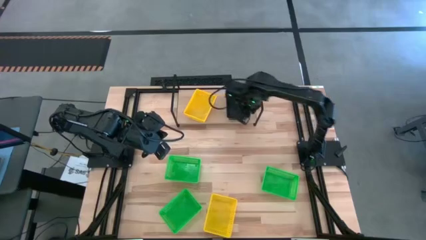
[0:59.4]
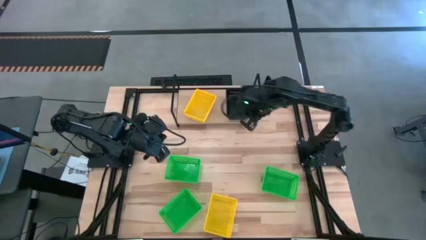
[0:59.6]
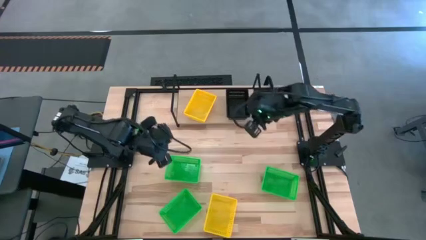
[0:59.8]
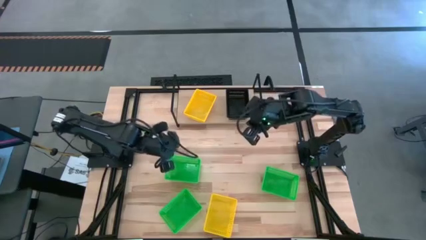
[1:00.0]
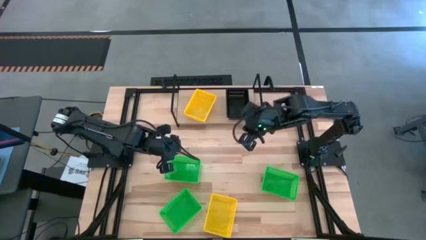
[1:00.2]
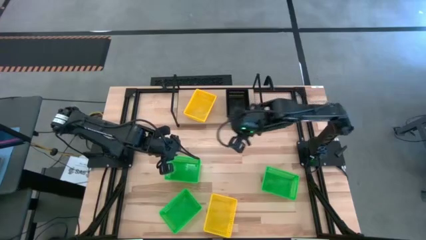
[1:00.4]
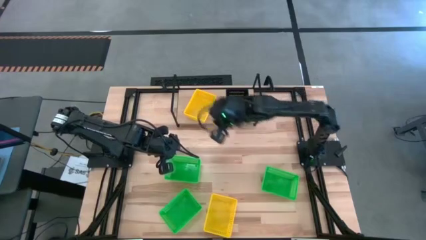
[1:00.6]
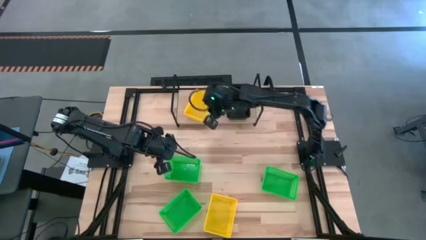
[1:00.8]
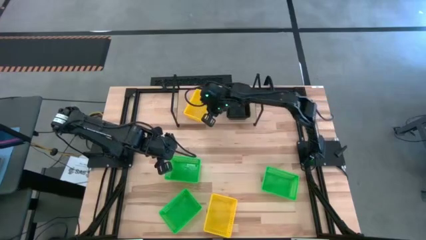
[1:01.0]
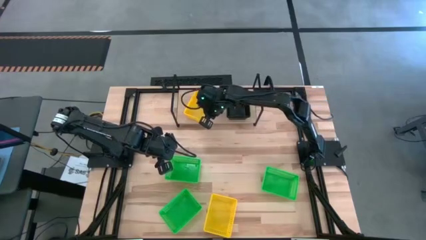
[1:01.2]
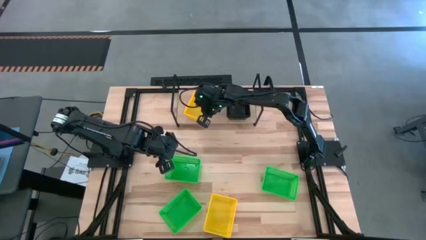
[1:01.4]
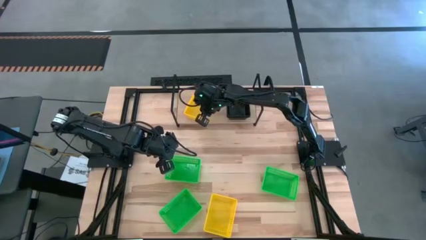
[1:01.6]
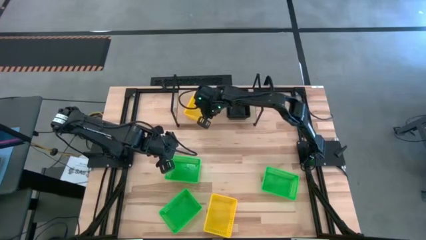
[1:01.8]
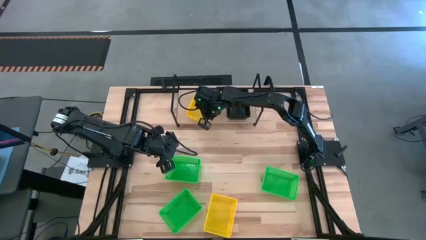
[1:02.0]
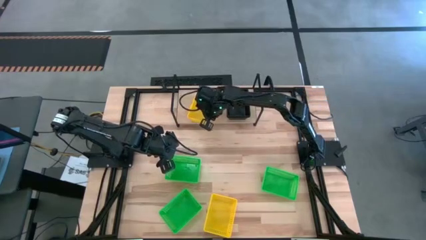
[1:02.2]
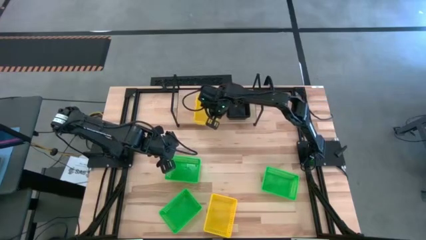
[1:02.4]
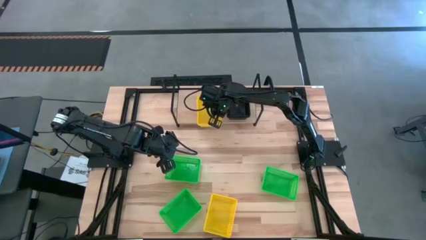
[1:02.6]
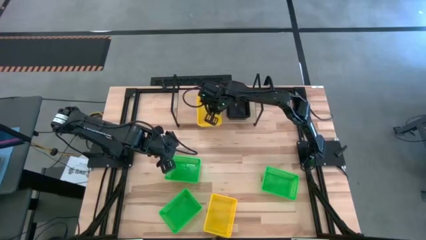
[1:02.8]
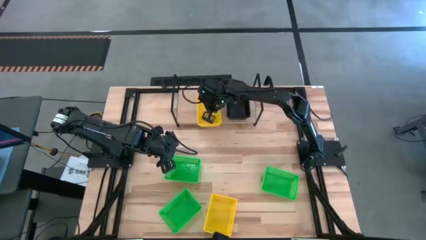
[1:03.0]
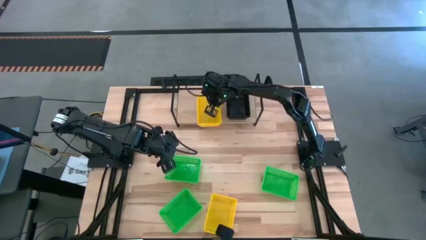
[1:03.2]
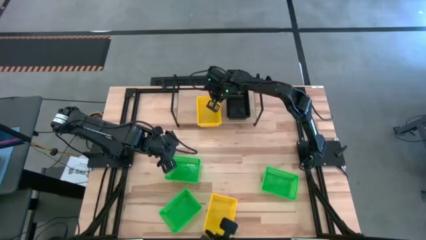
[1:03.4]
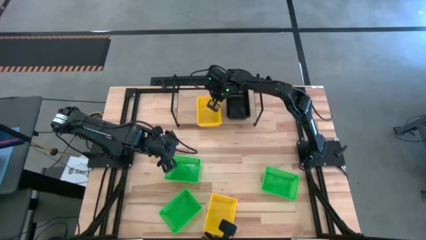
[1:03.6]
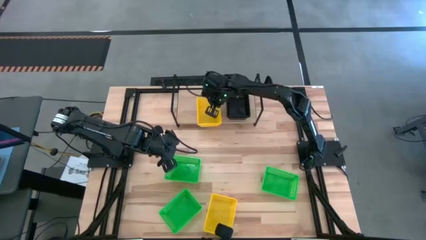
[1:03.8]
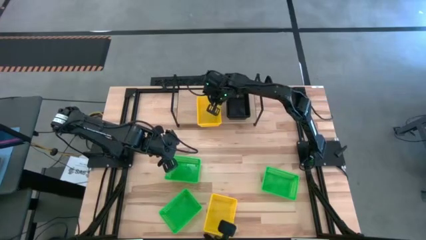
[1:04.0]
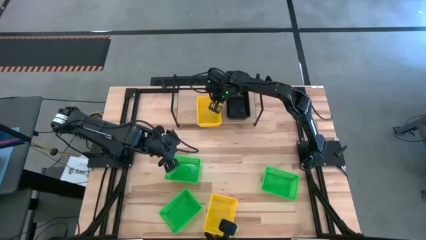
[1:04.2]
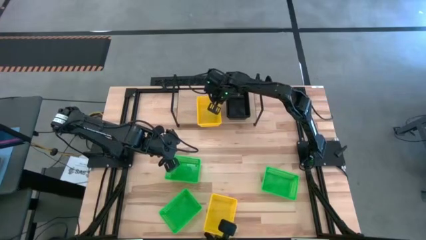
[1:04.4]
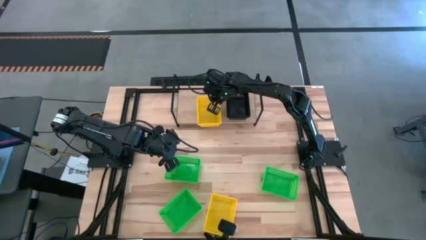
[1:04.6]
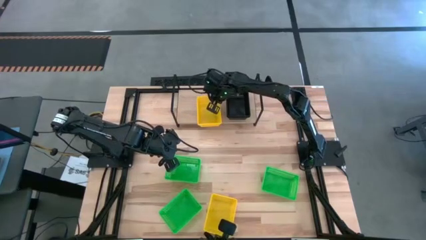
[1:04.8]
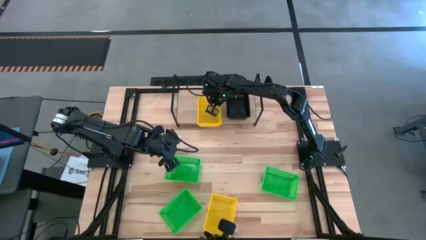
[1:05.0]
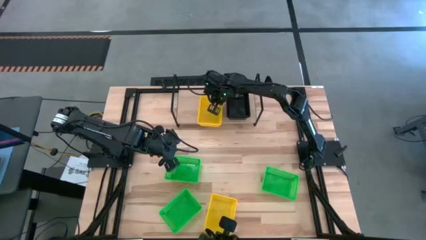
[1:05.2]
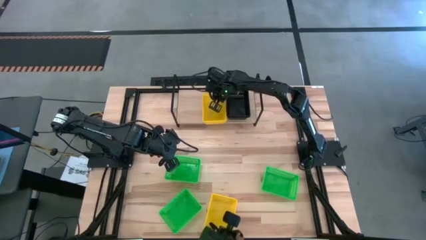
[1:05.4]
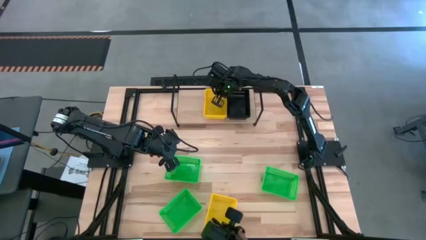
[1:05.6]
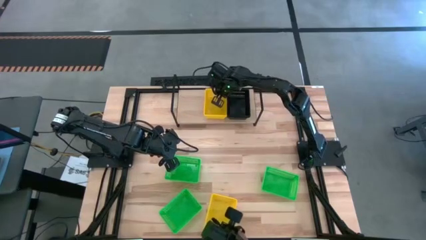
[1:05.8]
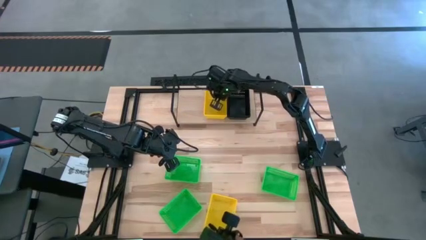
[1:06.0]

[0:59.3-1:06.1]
Task: Stack baskets on shelf by color
Adjust the yellow bins on the shelf

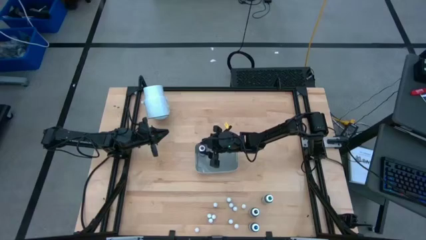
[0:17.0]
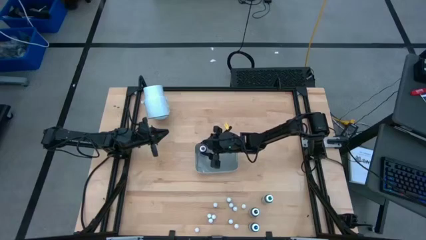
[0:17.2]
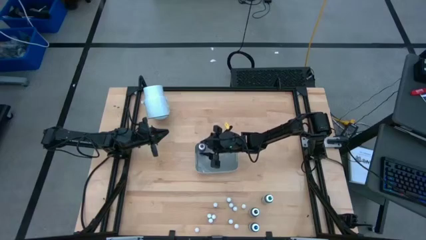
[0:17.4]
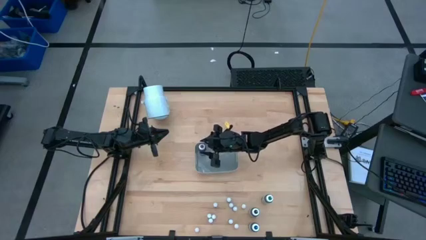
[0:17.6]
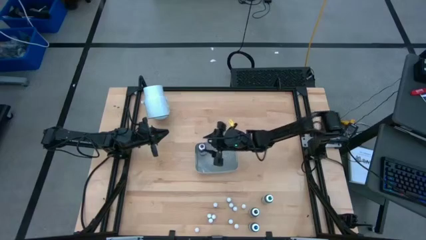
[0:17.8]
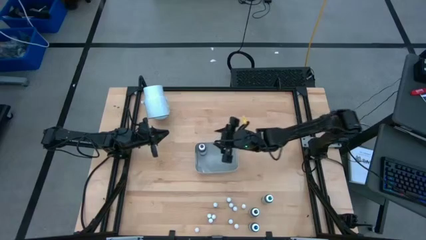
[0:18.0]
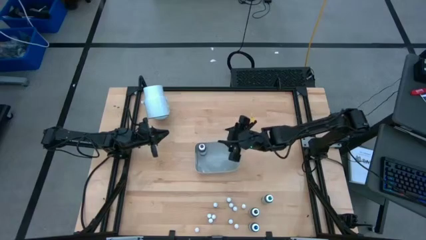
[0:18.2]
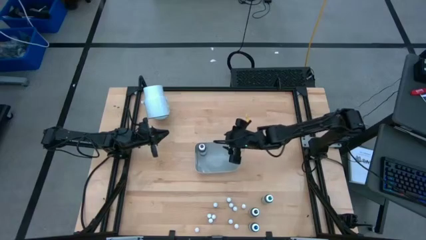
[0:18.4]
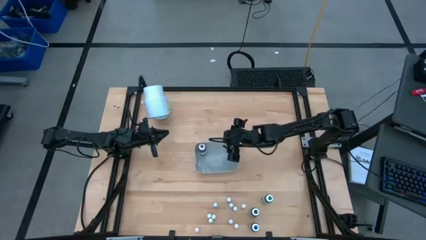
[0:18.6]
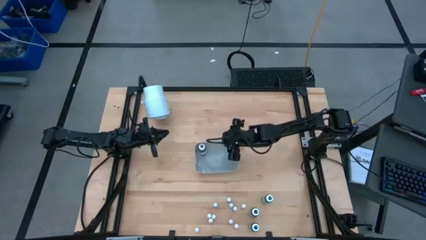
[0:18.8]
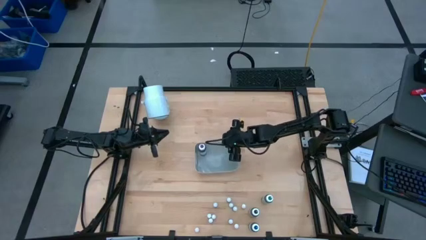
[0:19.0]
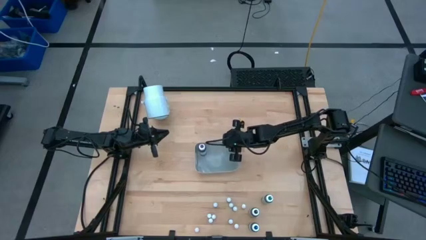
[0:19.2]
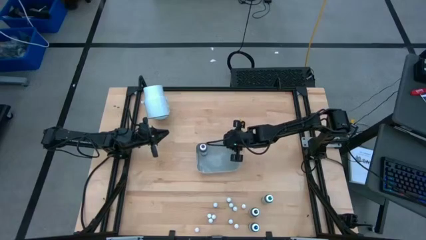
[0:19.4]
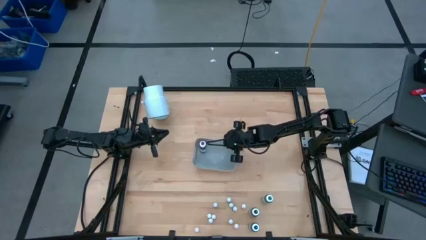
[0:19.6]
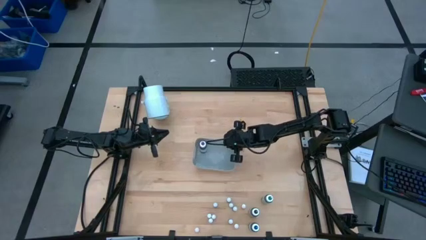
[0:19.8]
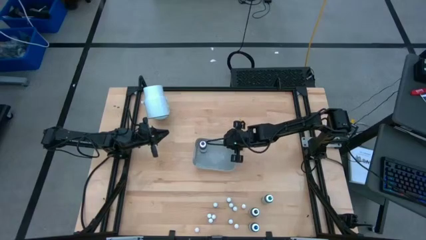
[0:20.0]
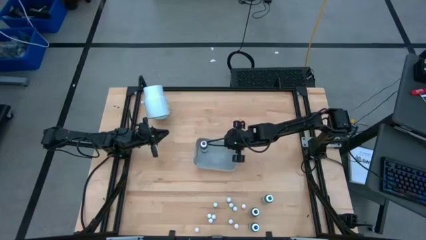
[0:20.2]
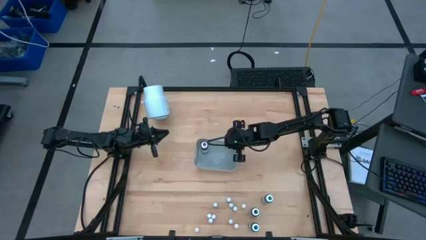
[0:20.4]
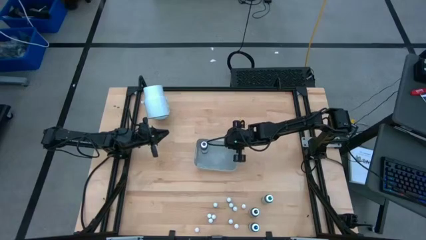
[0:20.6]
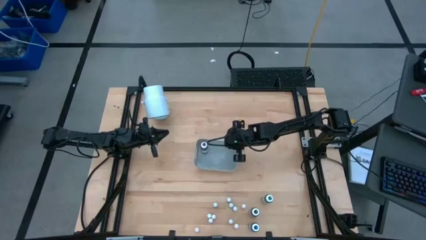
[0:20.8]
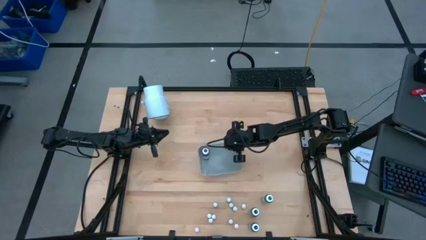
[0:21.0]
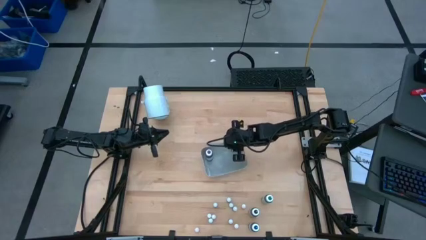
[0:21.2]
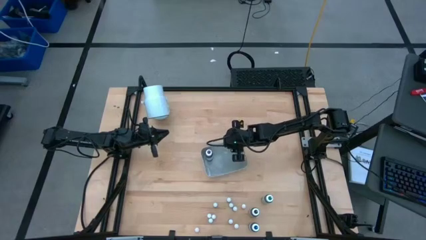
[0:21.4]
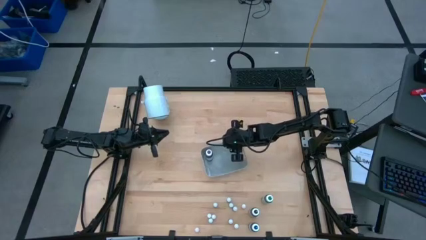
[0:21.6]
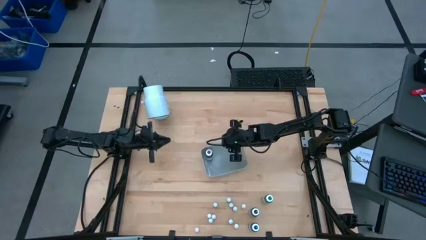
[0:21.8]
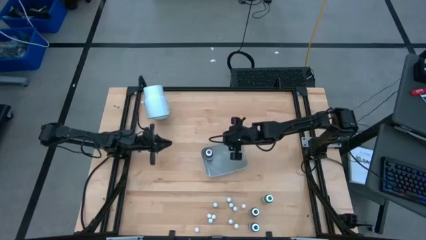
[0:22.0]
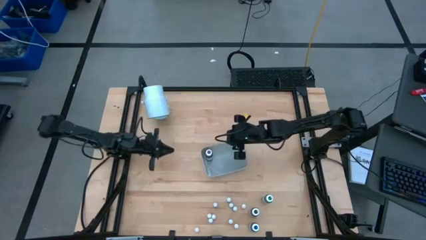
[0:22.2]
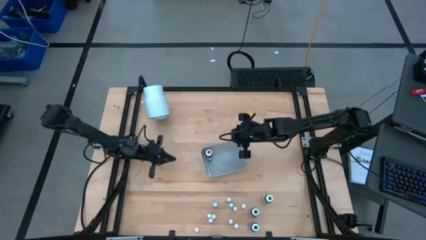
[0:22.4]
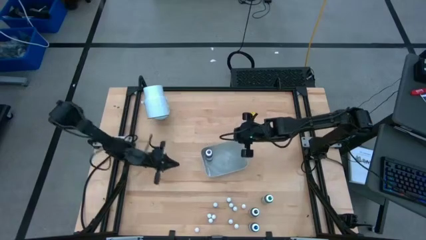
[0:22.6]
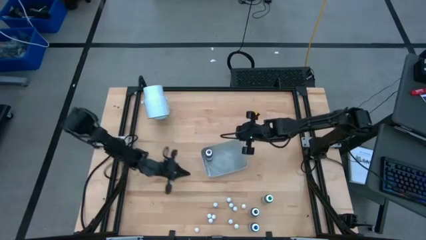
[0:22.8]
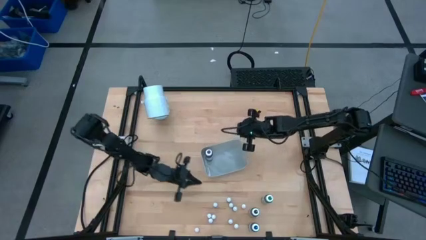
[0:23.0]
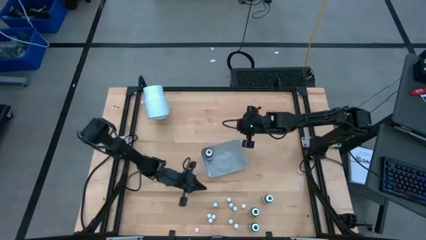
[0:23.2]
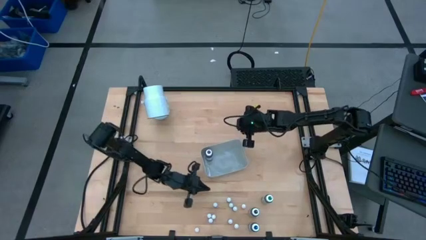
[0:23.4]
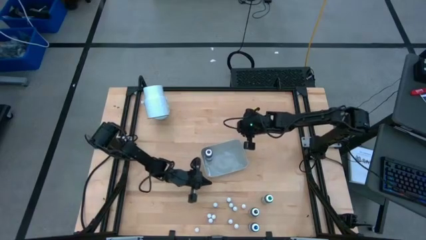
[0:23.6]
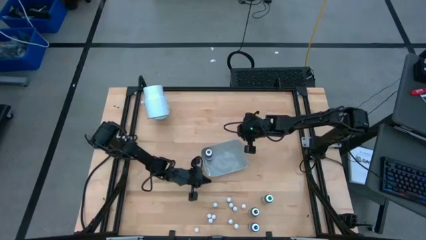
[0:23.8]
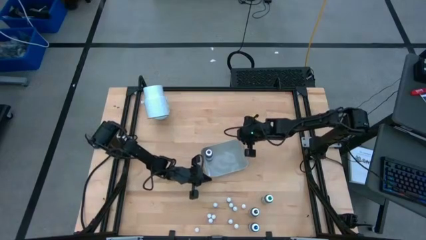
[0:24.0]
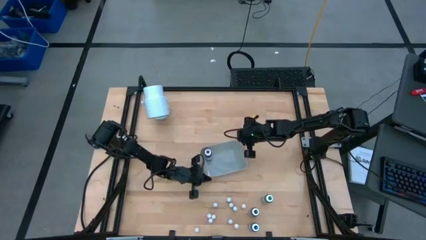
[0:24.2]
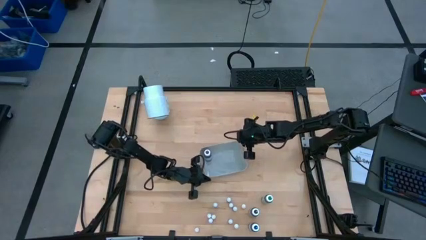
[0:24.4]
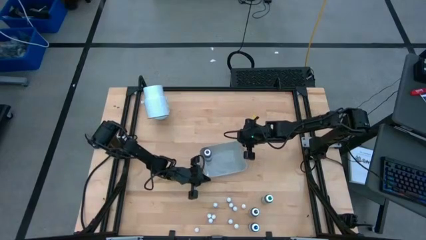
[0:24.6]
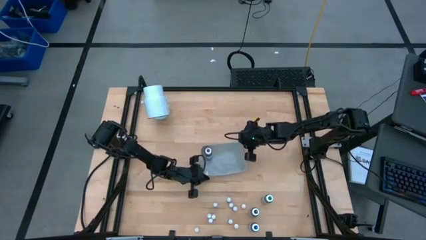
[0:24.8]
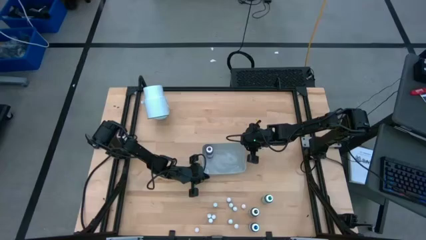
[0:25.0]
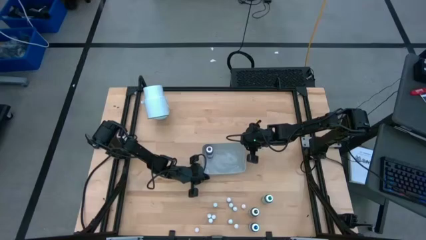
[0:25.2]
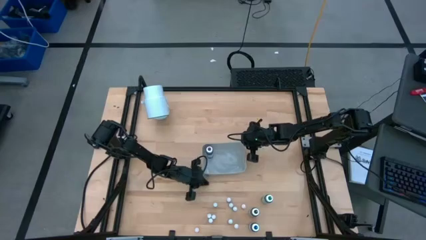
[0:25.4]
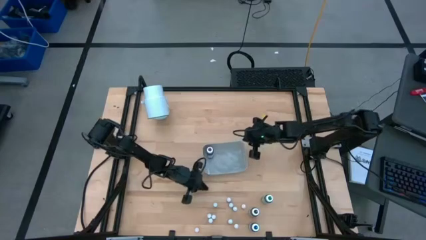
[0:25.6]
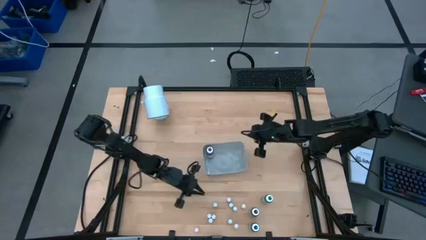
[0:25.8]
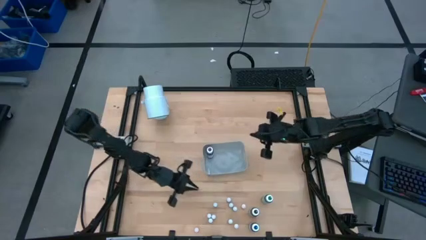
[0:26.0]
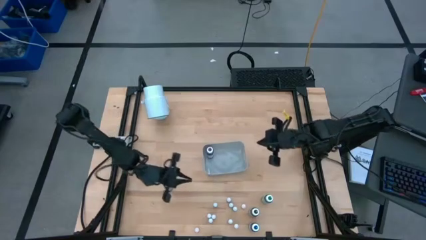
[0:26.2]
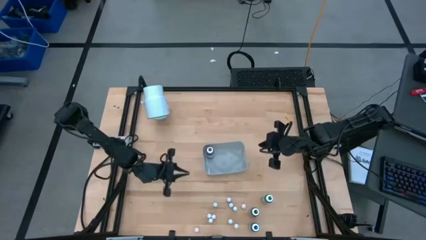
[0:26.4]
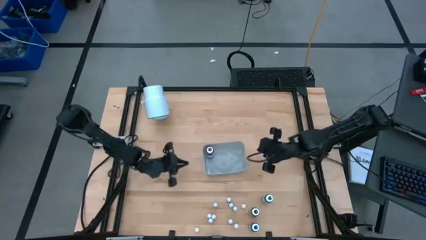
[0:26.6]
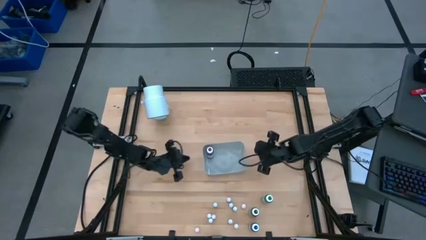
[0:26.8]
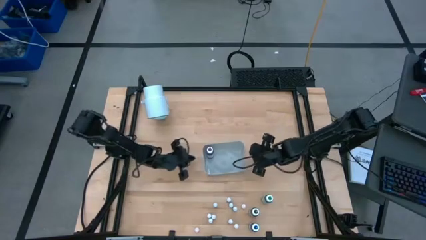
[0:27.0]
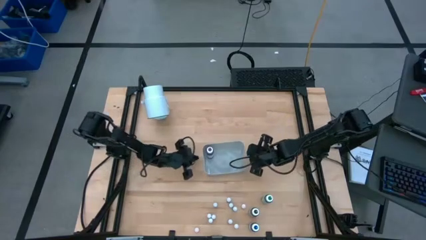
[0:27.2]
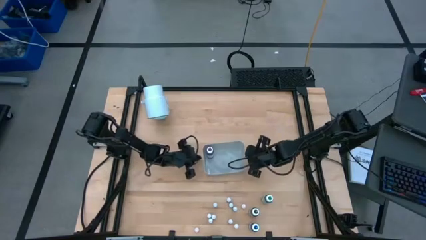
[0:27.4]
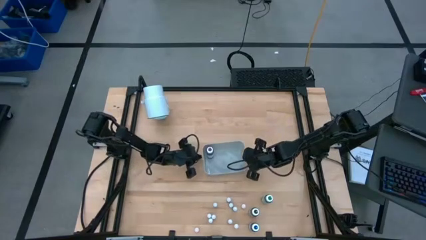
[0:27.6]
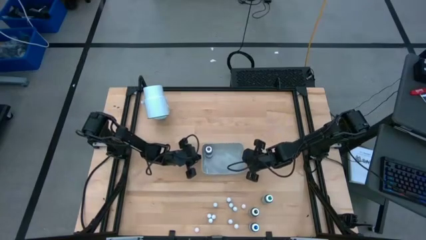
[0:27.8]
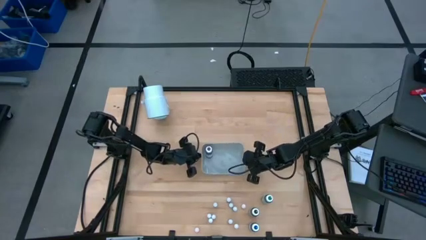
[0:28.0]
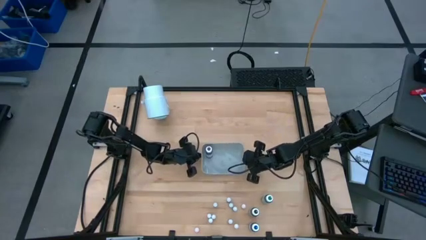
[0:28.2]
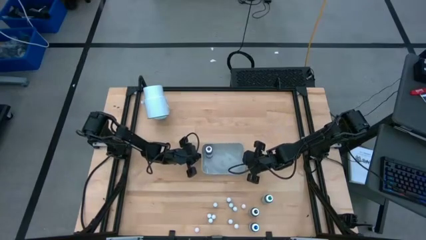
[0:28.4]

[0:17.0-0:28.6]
Task: Pick & Place food coloring
Adjust the bin on the table
